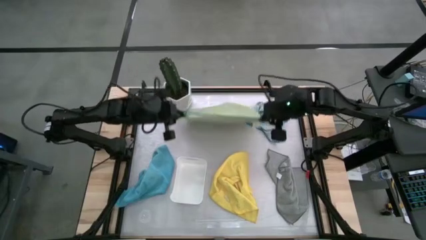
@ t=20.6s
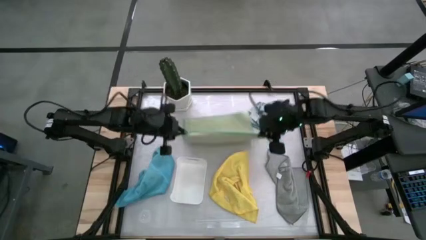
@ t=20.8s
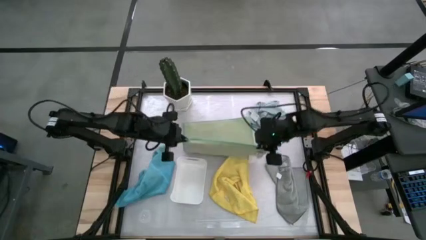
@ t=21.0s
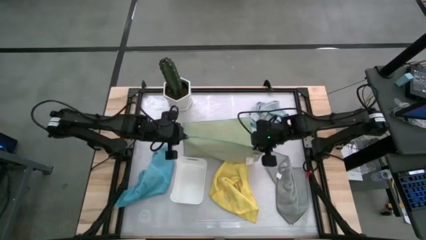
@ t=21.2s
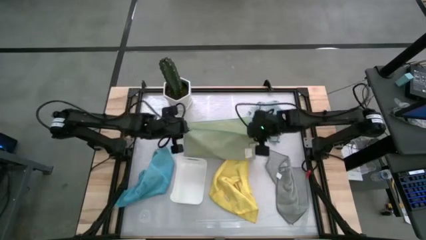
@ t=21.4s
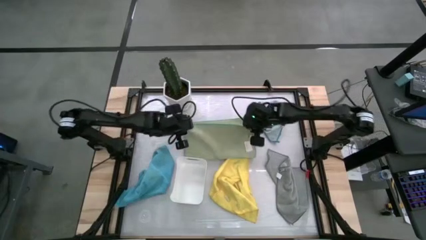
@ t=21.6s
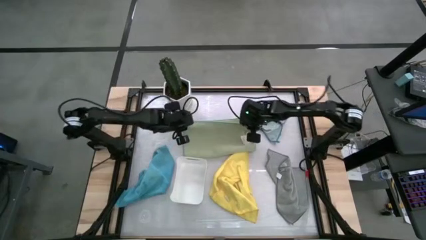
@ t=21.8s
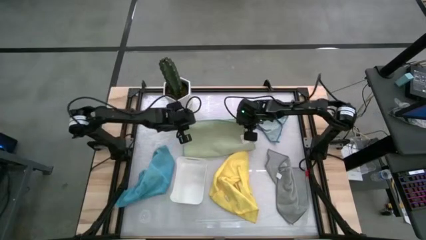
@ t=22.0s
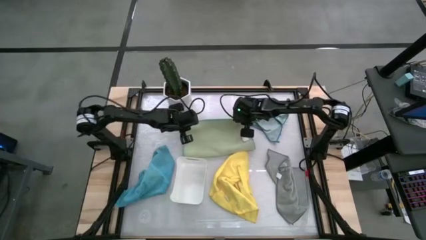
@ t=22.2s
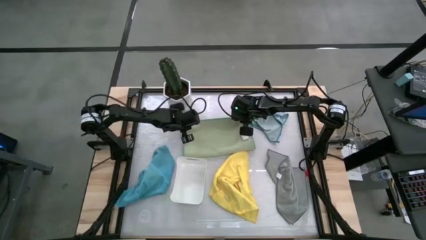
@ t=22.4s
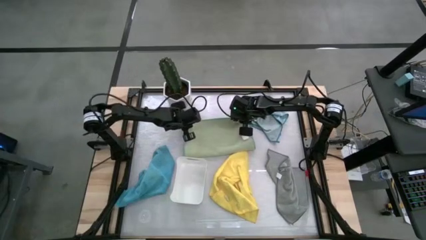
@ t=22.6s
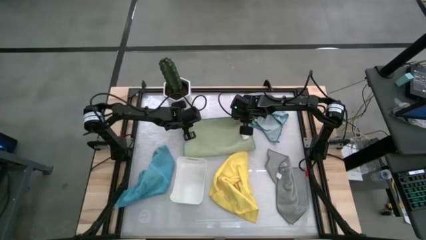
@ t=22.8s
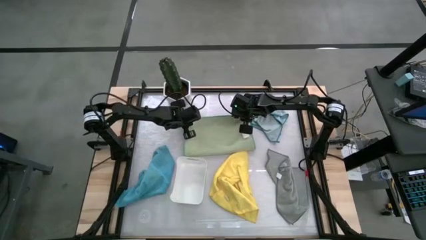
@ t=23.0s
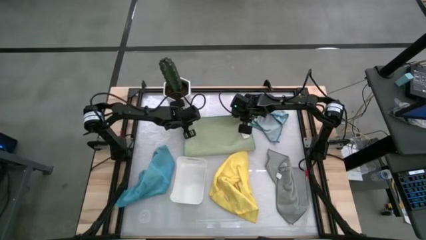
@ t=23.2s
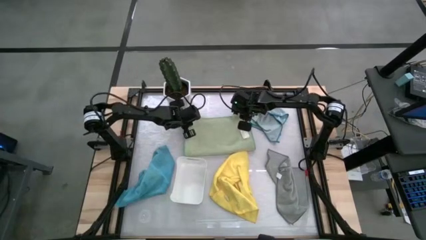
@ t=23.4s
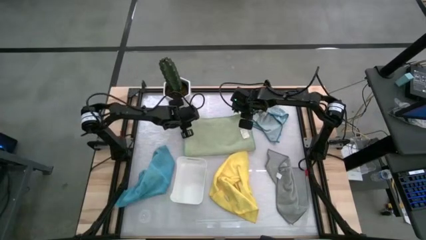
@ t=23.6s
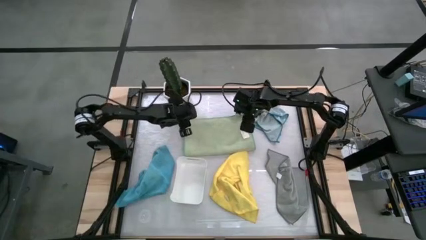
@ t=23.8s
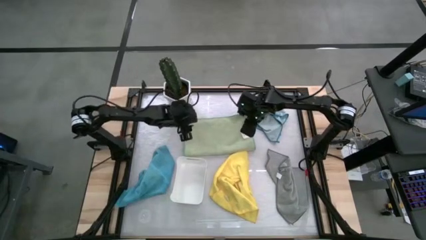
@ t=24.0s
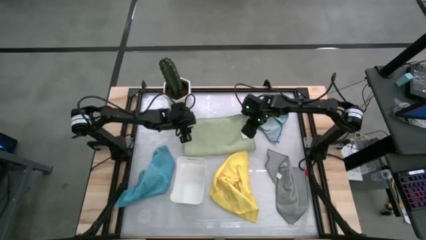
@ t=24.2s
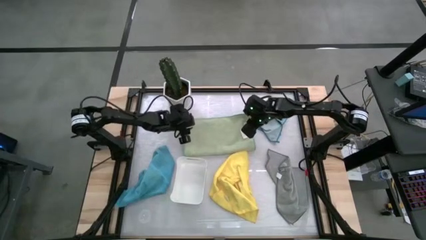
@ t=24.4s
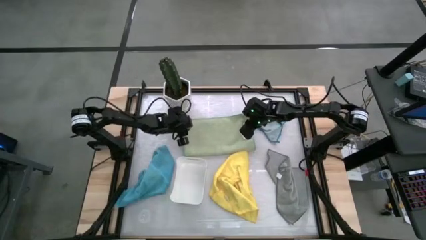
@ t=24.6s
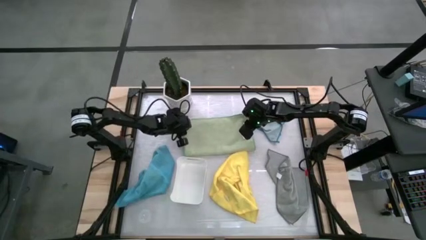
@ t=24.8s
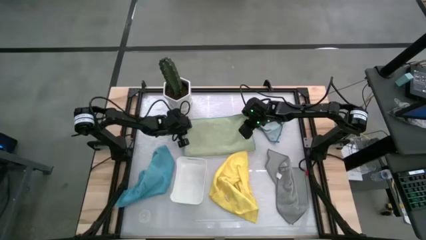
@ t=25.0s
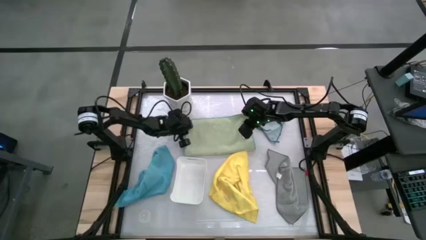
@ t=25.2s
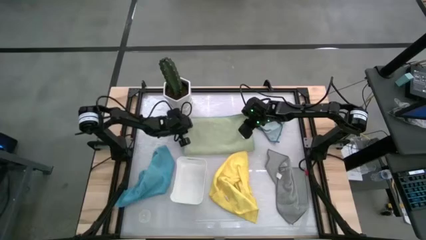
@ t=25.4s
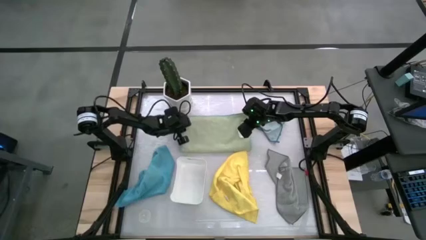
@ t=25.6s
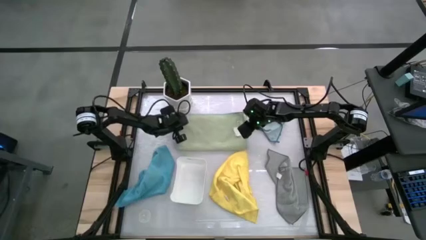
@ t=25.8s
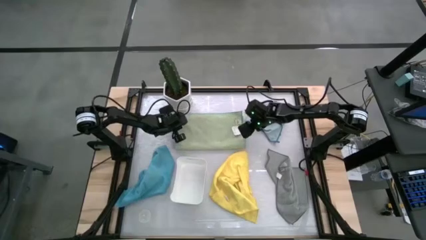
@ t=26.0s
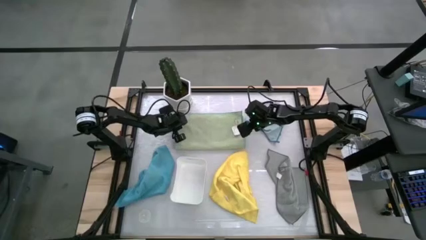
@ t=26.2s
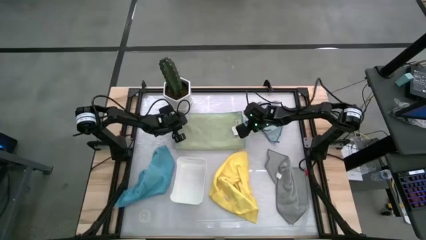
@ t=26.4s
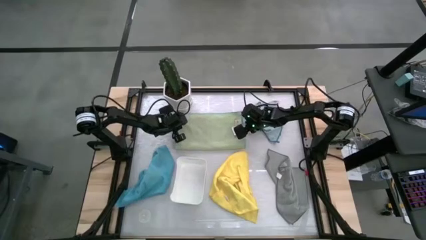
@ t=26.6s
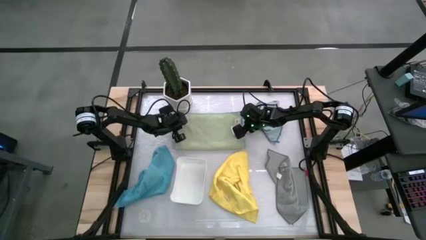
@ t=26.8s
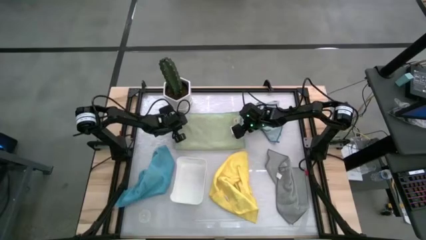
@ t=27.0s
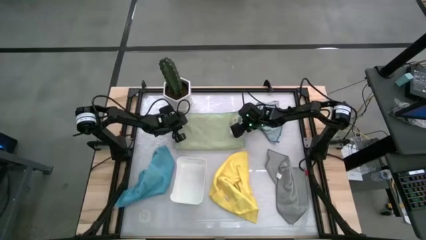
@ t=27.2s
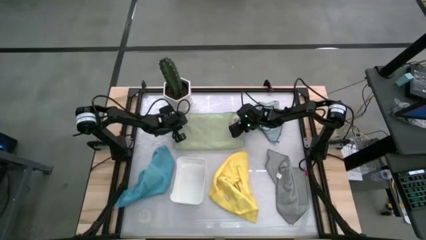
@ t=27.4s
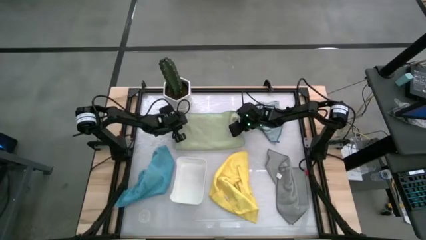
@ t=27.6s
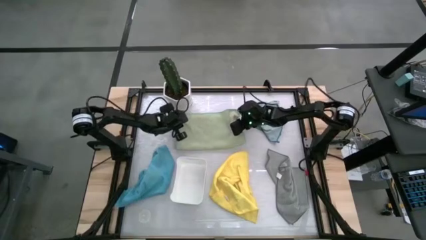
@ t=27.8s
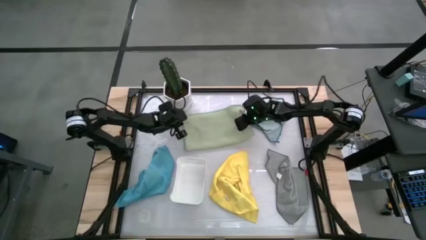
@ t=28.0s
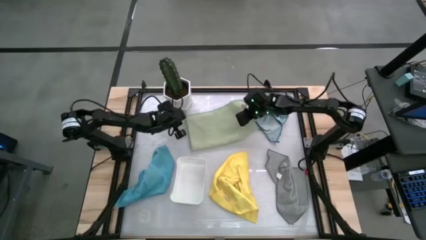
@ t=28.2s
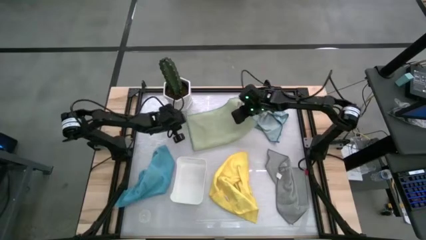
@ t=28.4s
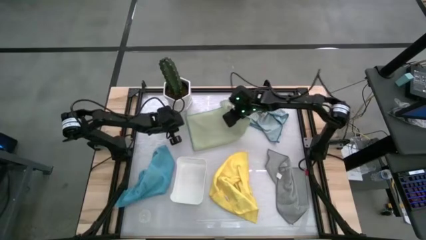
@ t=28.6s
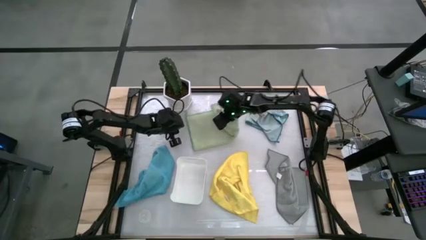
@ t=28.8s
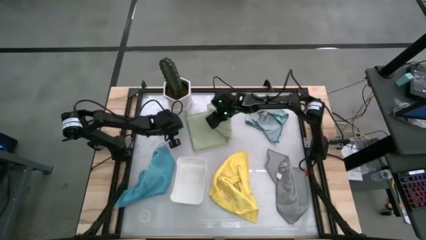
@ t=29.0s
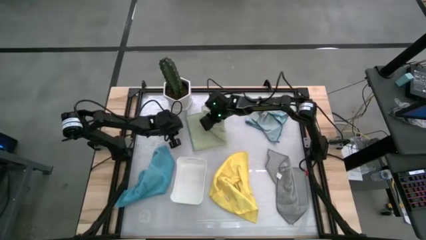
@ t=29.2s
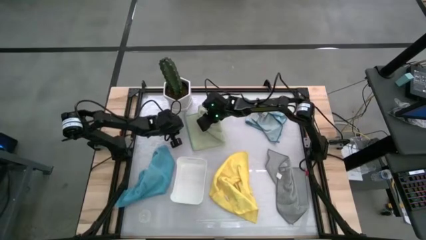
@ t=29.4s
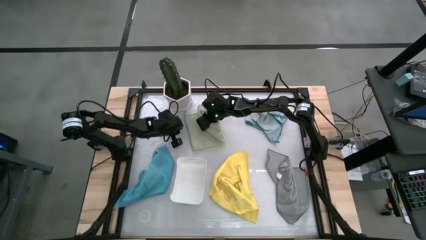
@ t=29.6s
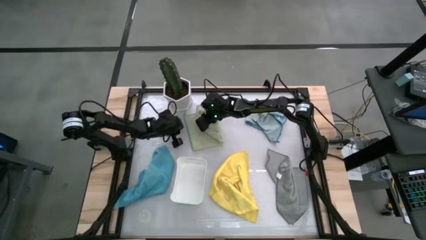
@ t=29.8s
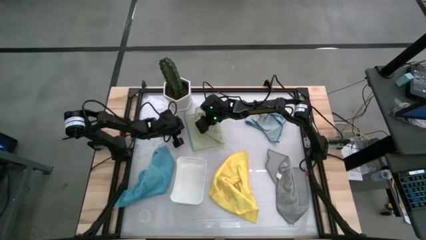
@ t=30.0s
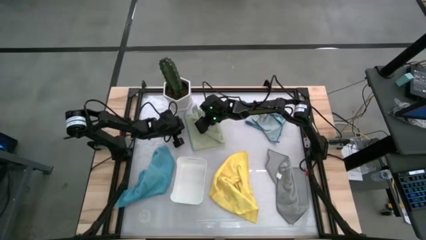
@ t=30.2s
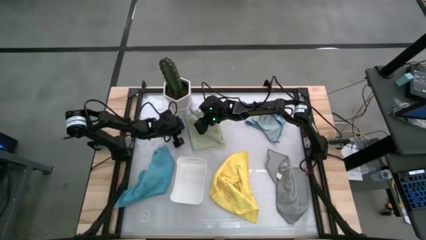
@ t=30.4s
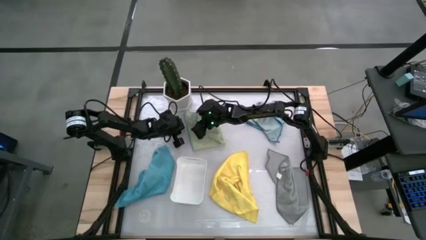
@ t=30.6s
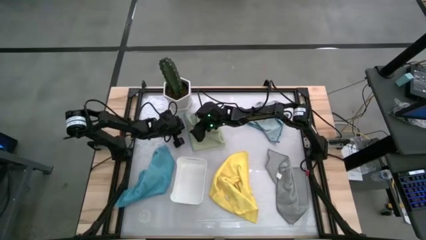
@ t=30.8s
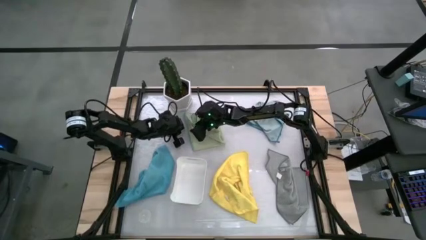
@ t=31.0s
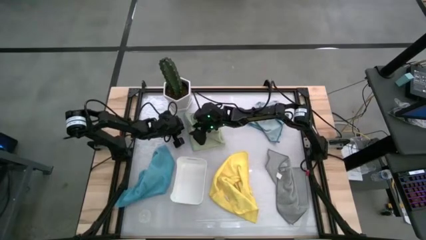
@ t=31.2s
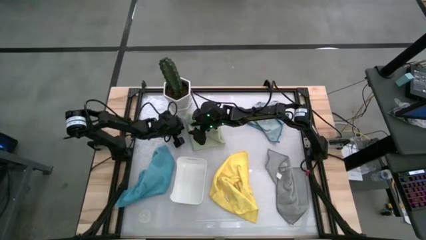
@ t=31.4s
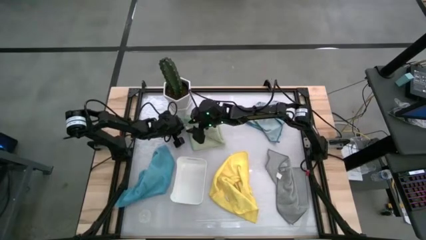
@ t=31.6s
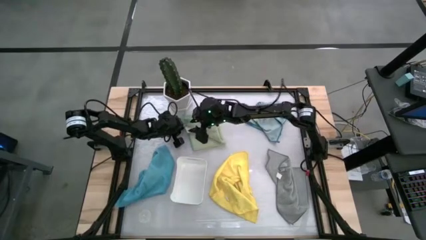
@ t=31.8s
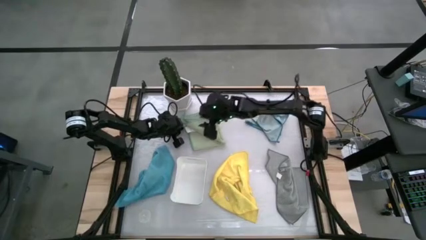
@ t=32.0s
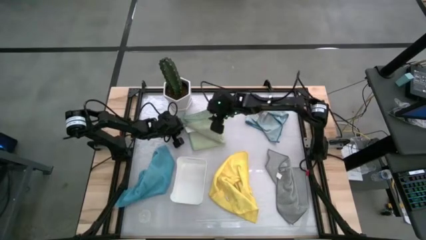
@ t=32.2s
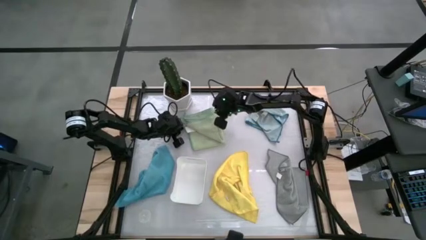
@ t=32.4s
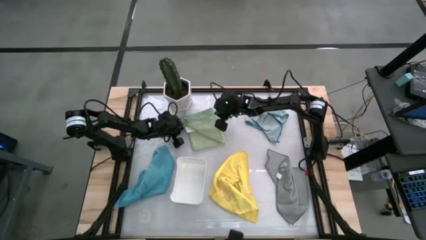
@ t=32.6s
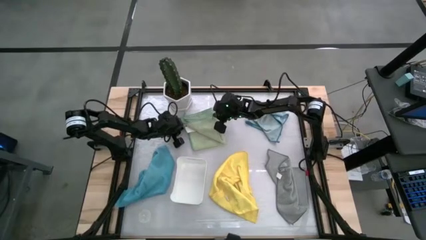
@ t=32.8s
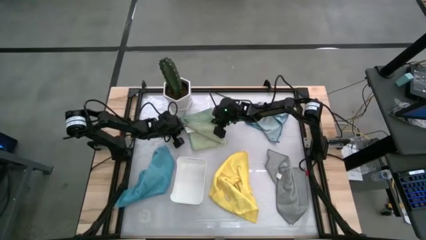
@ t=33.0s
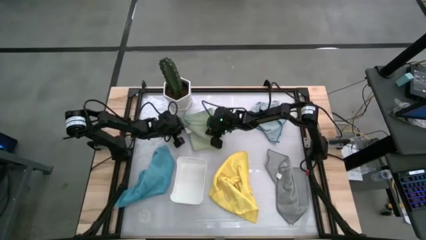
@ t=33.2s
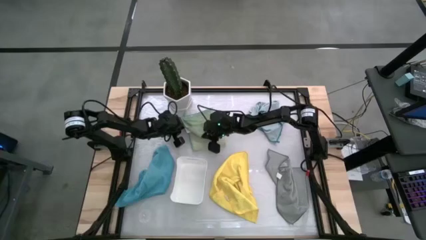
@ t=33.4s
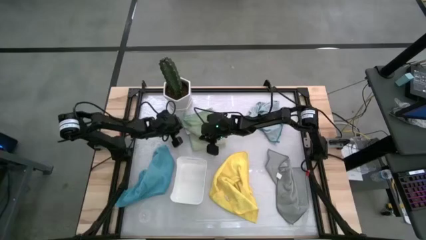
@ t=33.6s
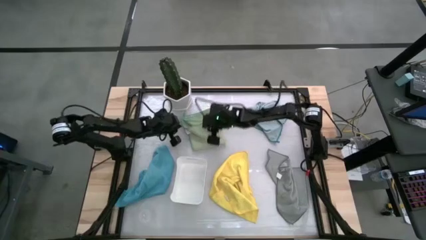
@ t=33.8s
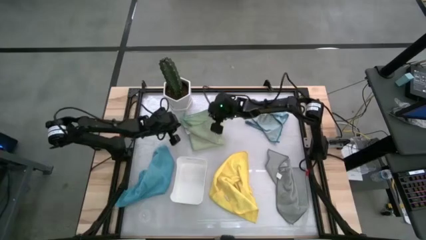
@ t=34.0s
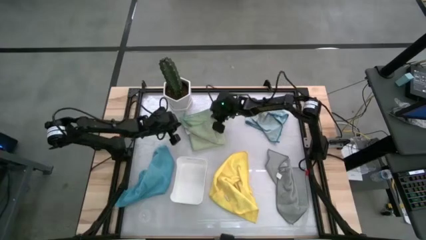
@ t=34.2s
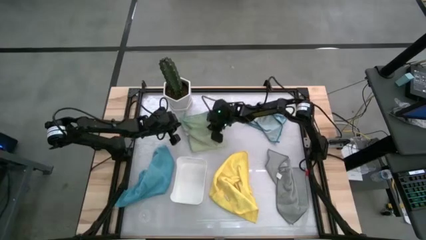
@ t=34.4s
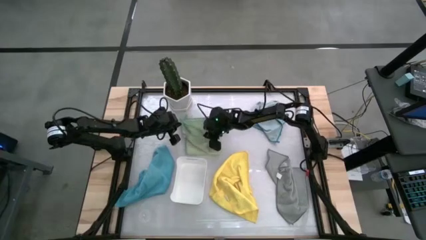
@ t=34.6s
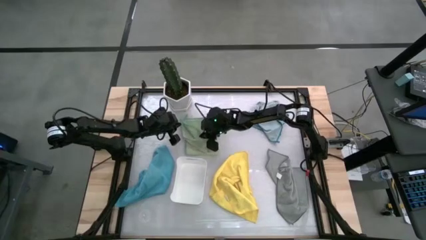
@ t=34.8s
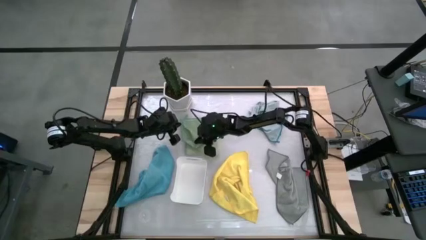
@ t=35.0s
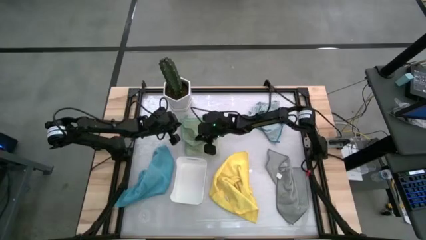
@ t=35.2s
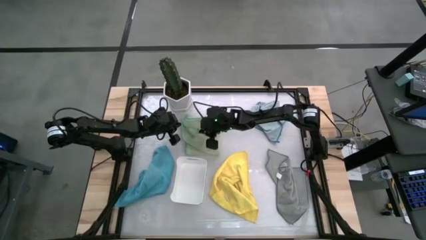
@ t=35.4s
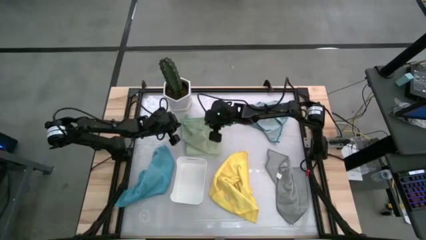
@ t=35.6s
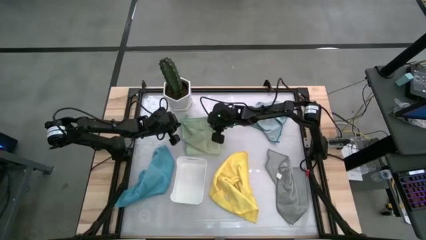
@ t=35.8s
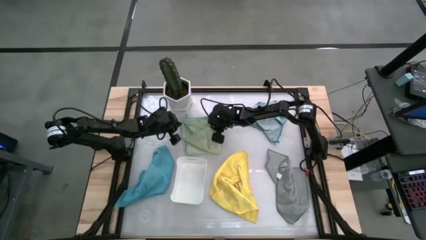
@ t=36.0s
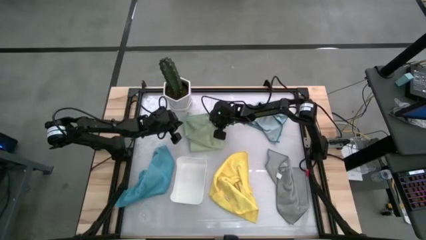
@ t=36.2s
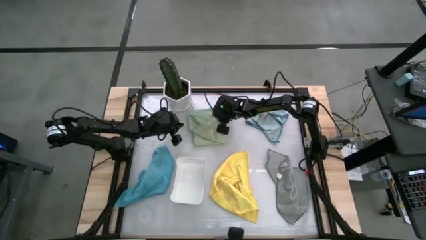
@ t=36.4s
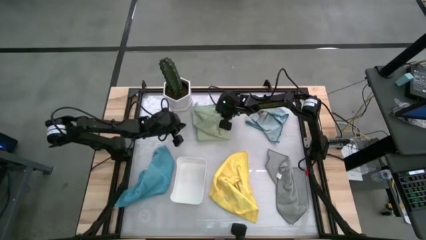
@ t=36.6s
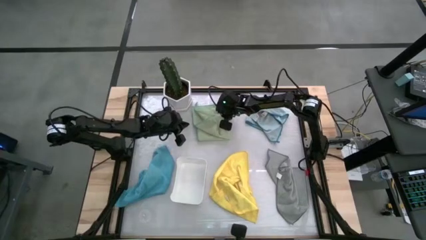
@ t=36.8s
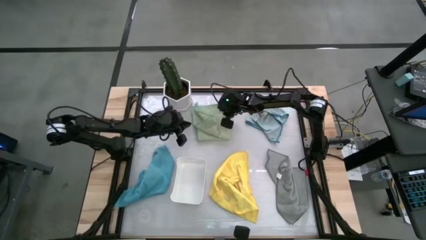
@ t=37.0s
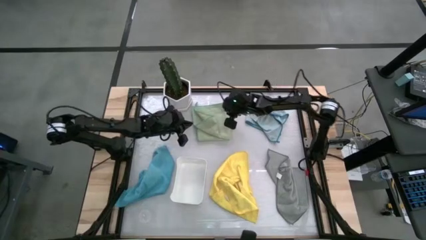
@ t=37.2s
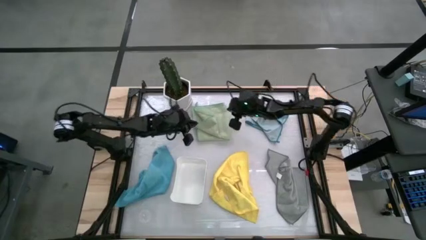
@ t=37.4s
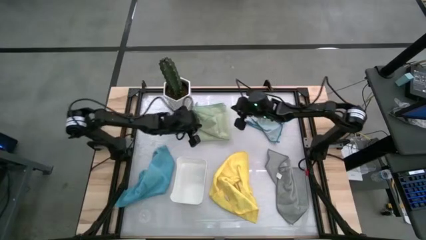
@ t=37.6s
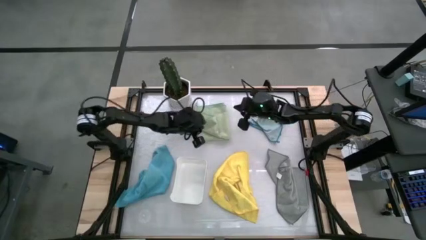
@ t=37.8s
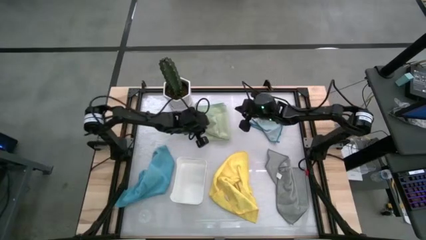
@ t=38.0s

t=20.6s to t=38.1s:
Task: Fold microfiber towels
Fold the green microfiber towel
